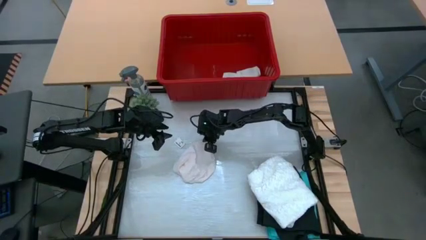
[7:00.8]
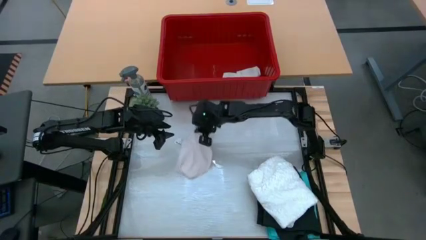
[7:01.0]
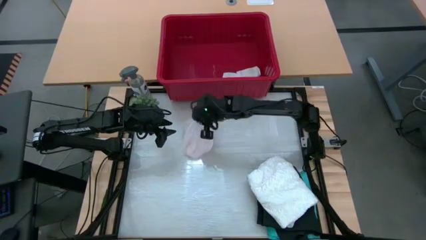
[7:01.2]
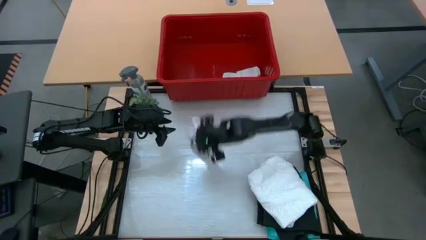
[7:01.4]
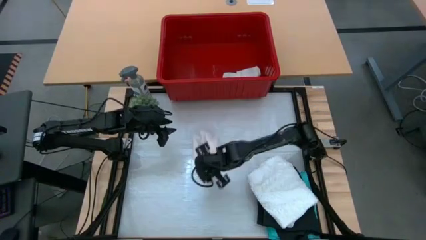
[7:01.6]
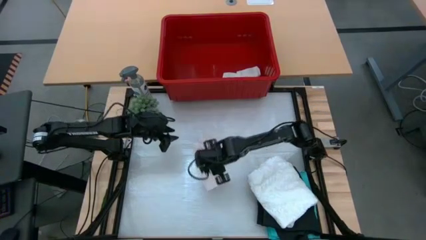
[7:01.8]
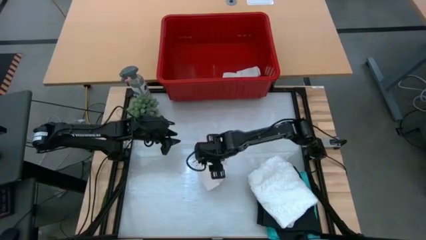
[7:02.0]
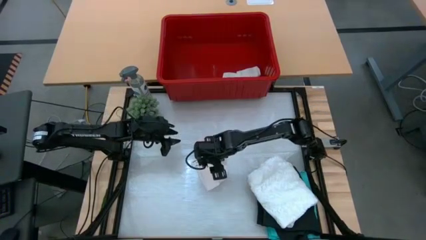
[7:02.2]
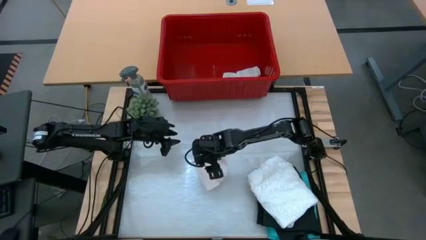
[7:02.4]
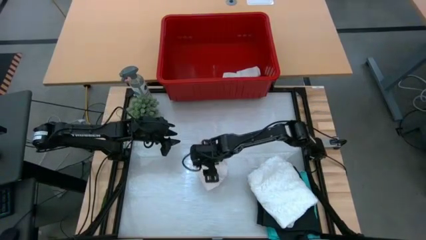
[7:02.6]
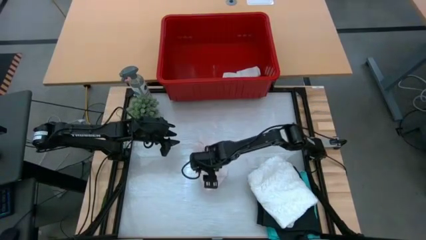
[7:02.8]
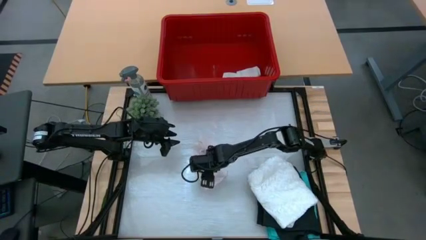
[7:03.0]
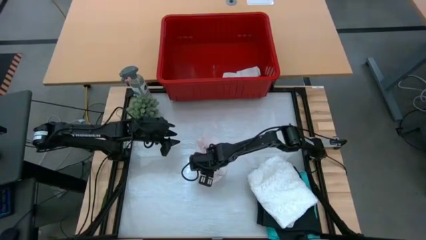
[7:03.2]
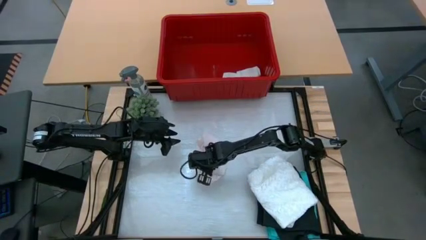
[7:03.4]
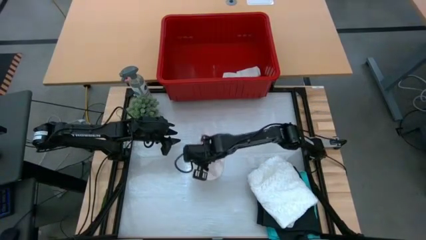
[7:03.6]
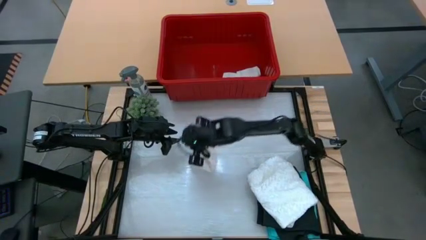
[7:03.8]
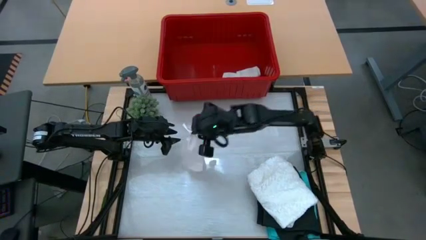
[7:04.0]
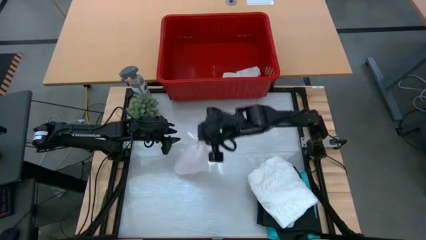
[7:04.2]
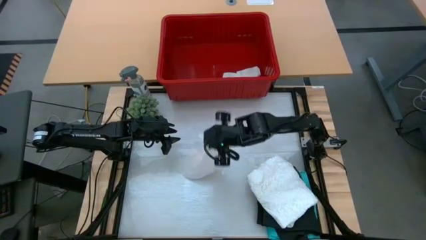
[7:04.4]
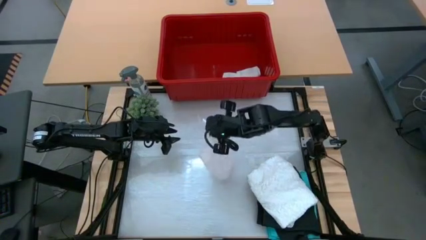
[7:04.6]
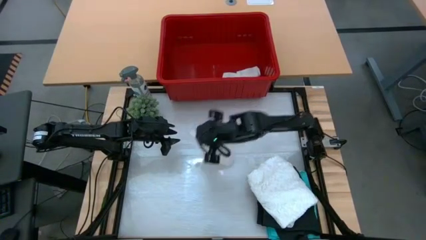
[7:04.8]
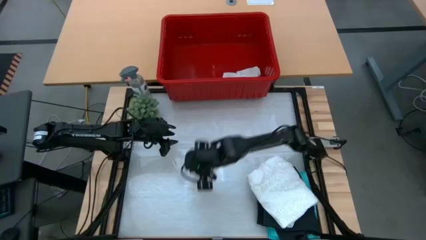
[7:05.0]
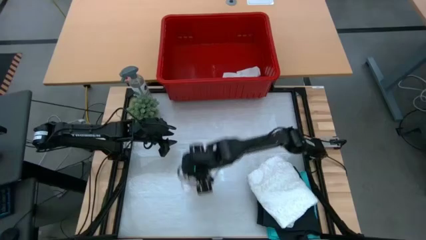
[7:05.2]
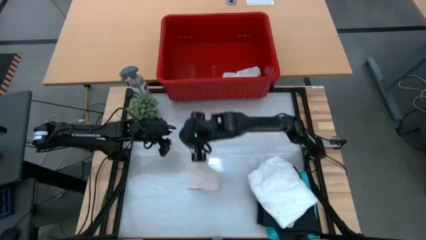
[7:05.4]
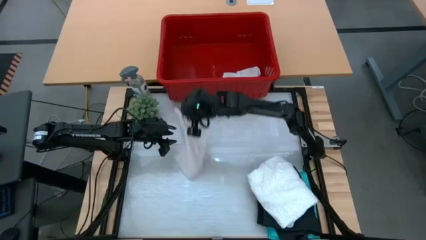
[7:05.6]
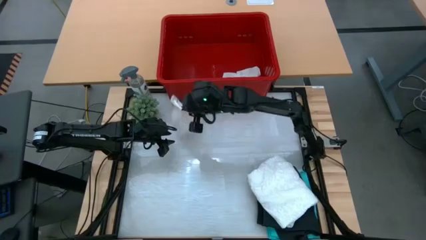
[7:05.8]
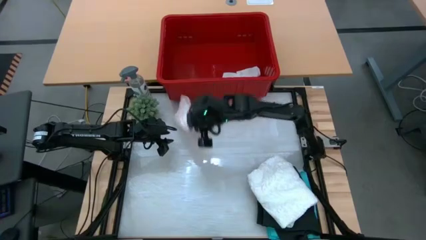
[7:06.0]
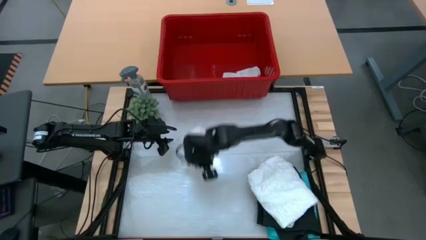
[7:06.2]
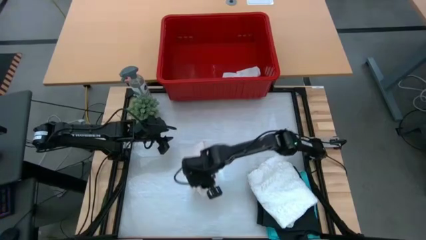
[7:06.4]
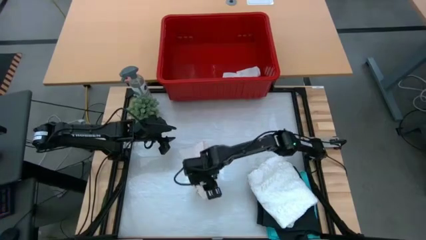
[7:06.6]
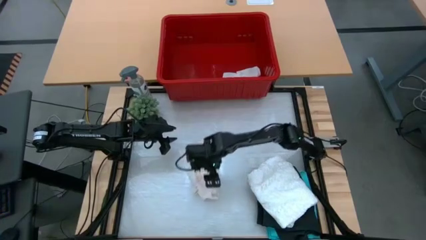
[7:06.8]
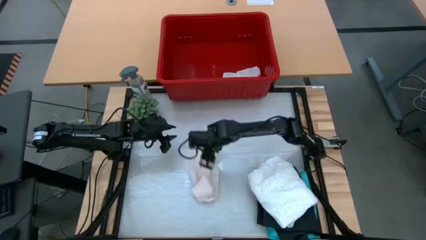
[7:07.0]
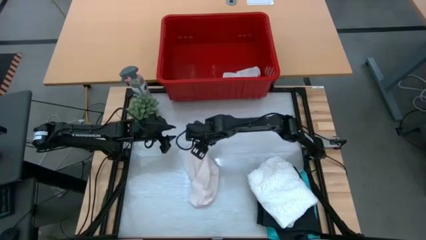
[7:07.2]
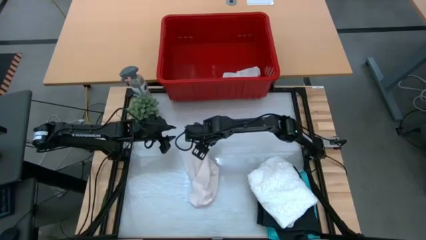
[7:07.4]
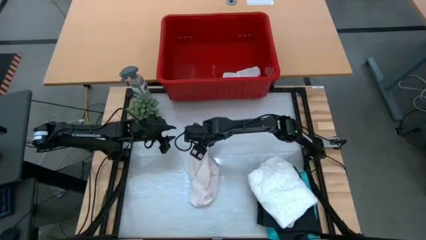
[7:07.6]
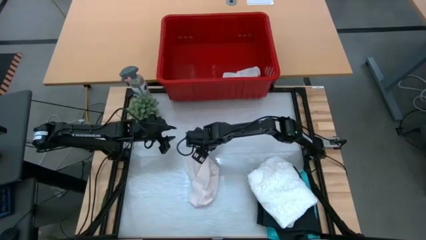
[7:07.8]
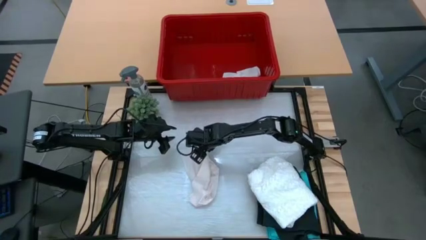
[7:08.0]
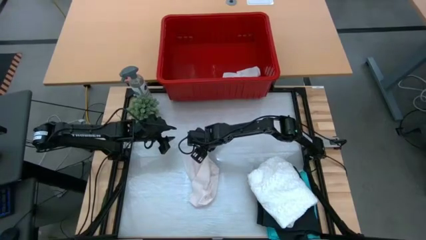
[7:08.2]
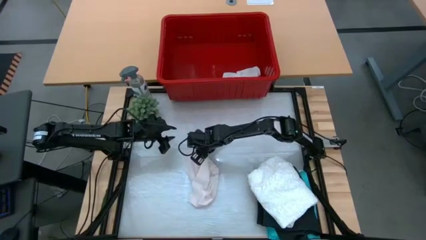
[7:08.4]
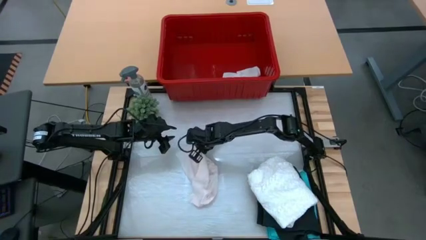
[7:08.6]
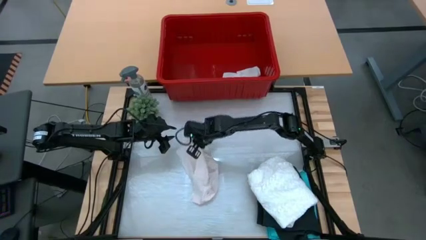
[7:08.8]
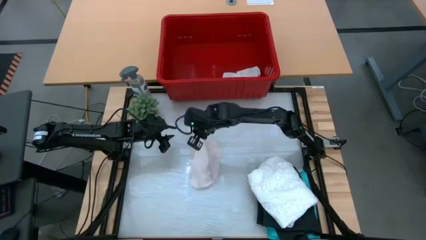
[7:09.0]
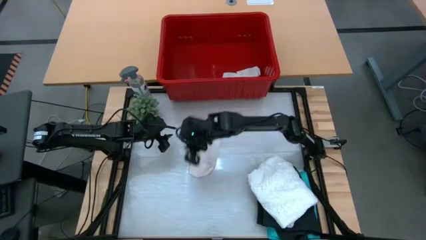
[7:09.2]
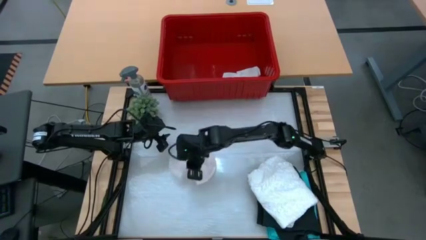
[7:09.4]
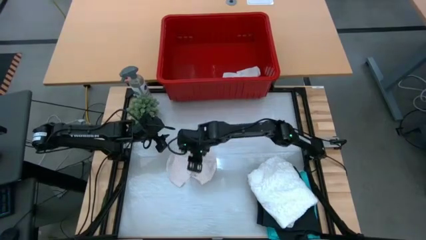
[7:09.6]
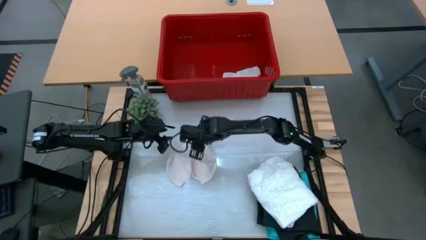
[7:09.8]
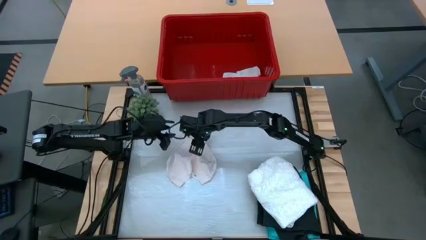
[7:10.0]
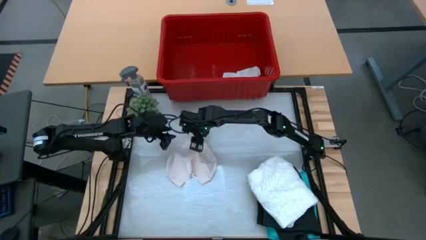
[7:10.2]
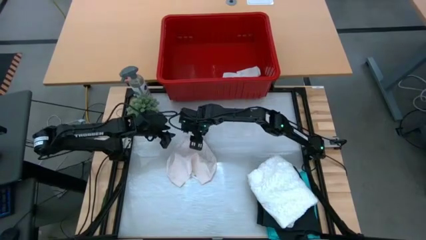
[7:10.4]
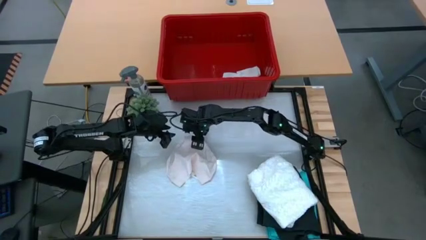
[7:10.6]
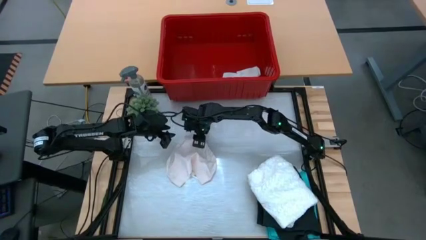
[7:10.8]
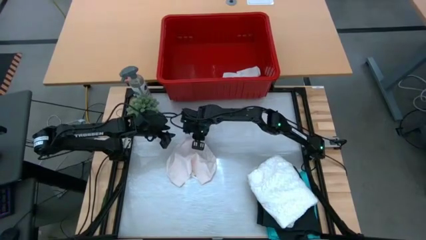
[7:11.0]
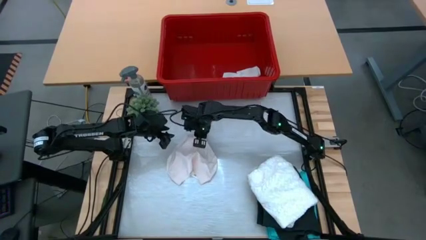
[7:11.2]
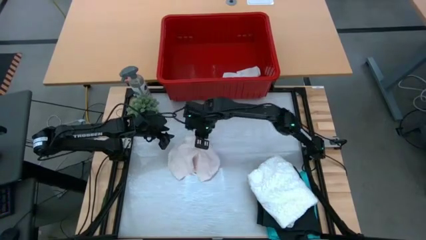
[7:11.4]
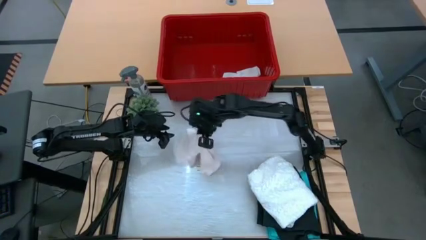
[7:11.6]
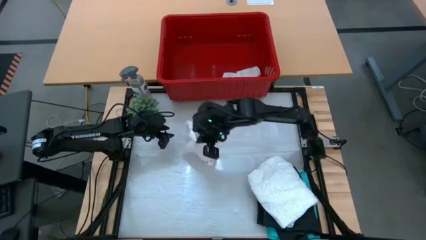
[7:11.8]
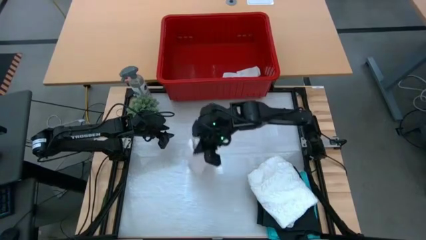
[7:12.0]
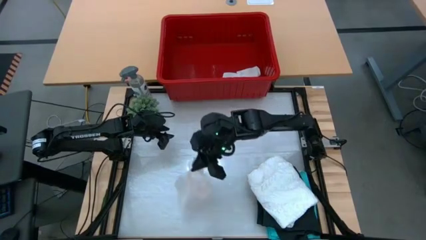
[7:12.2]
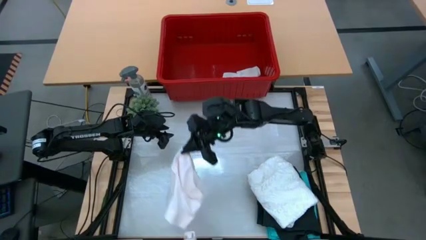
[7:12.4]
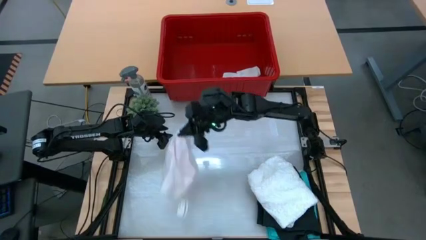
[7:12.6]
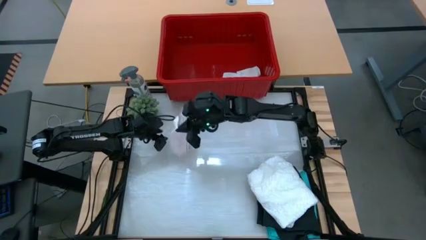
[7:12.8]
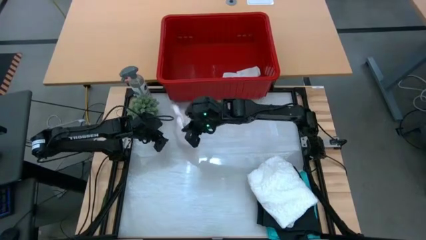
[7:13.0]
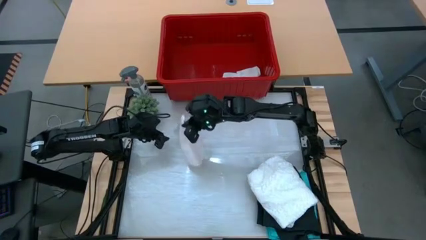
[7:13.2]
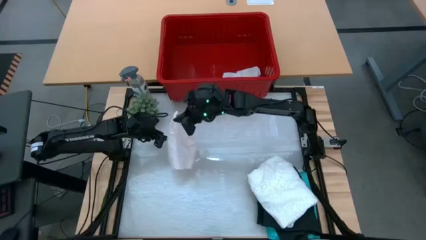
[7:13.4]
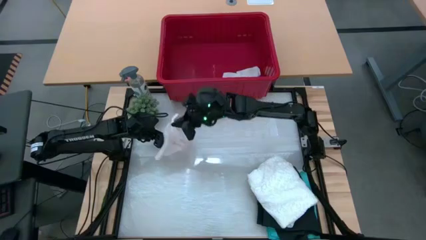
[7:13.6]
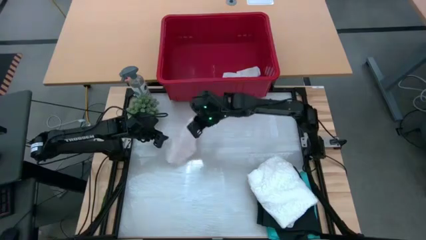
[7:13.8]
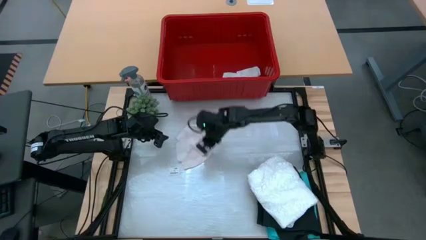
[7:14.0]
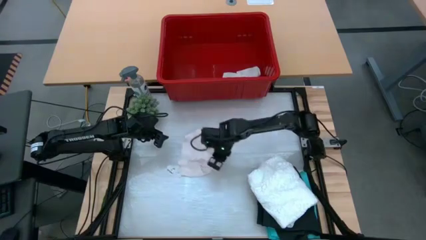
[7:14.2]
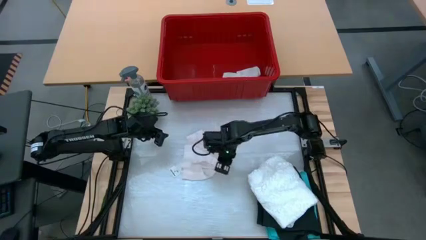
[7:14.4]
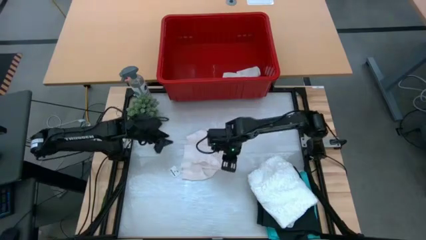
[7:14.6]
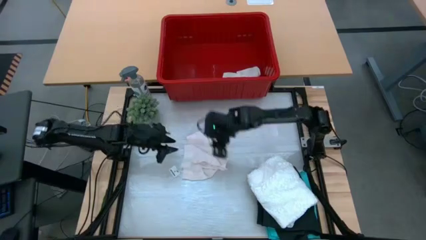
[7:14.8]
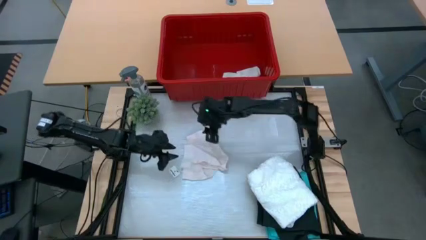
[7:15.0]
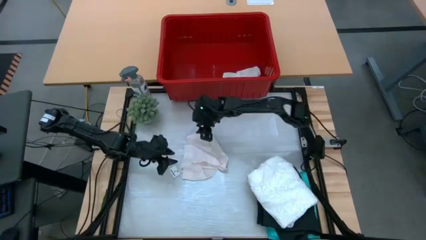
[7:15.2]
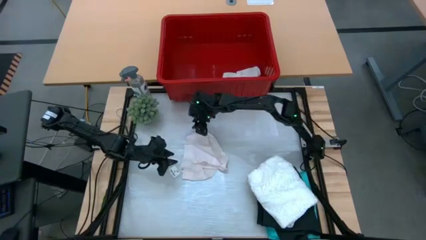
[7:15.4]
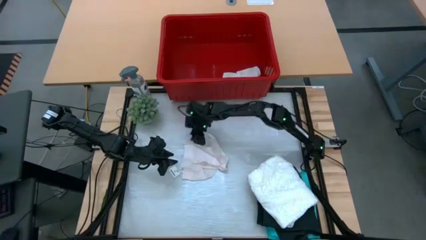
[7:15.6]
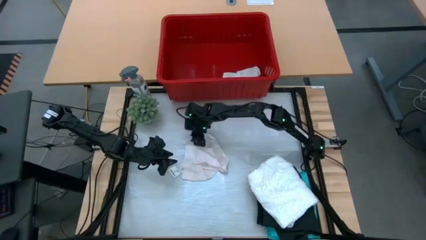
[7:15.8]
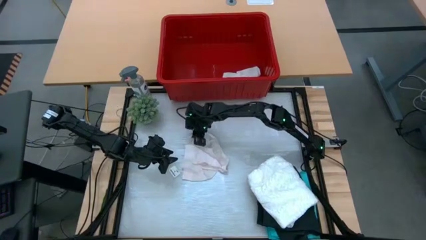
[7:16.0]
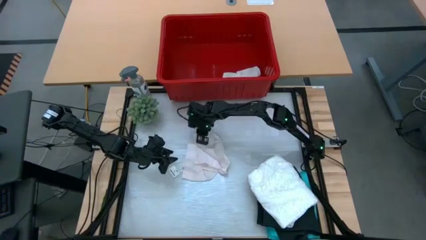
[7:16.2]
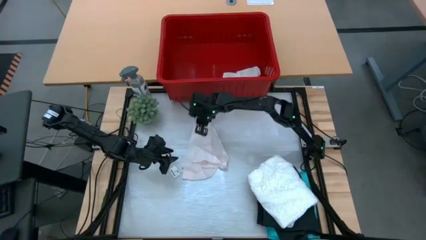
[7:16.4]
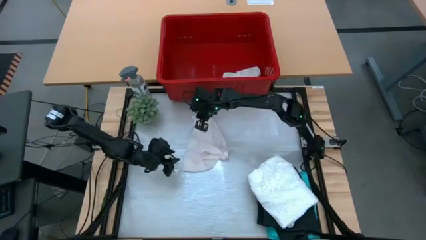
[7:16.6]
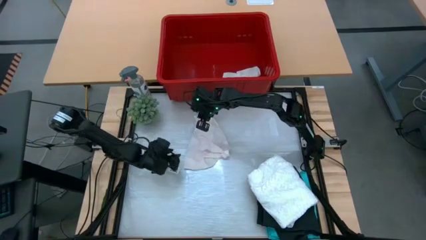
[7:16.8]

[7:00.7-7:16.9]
Task: Fold Laundry from Bin
Fold the white underwear
